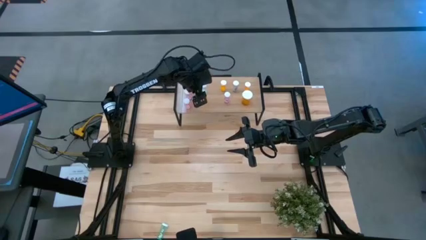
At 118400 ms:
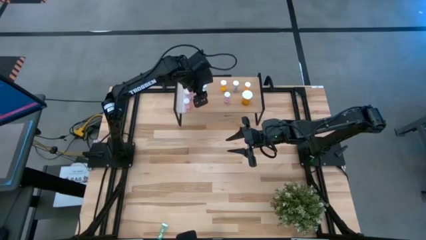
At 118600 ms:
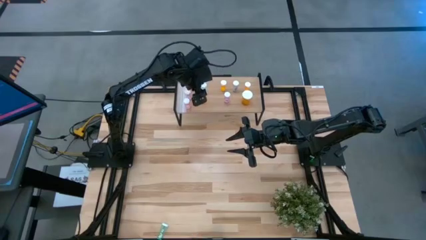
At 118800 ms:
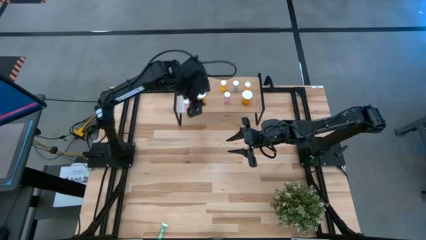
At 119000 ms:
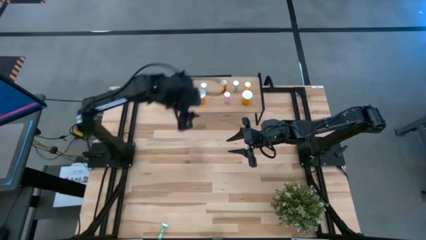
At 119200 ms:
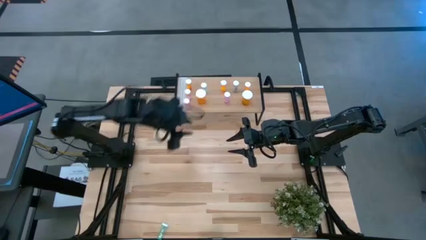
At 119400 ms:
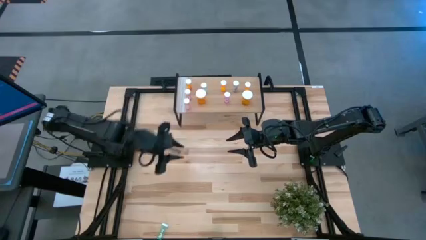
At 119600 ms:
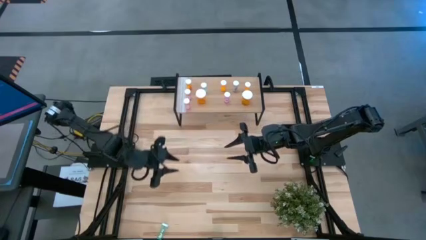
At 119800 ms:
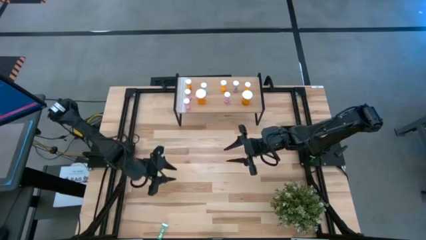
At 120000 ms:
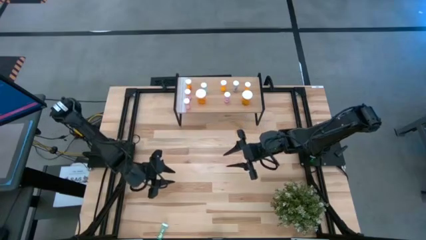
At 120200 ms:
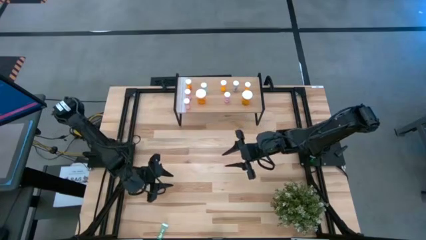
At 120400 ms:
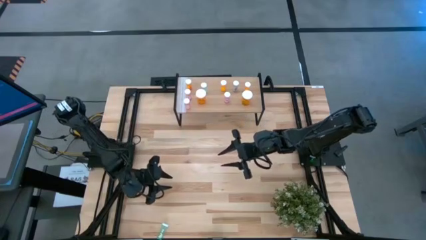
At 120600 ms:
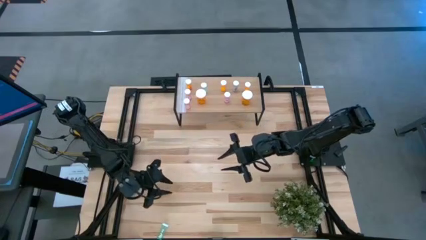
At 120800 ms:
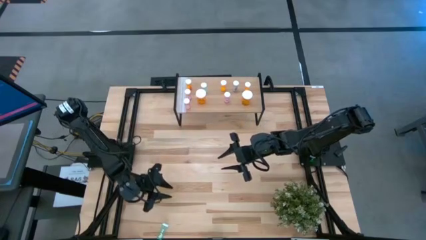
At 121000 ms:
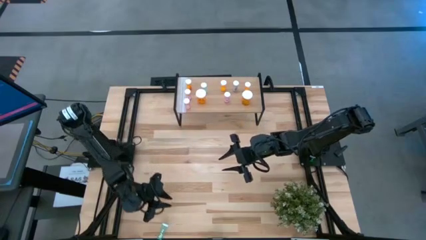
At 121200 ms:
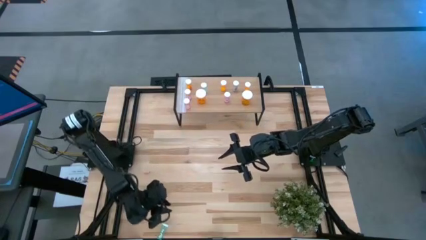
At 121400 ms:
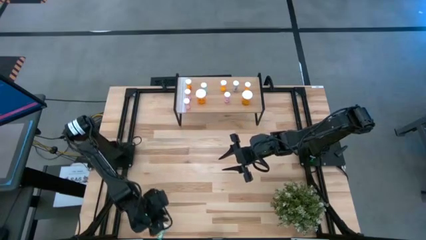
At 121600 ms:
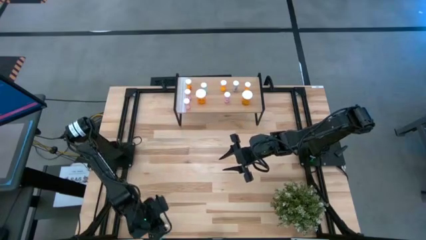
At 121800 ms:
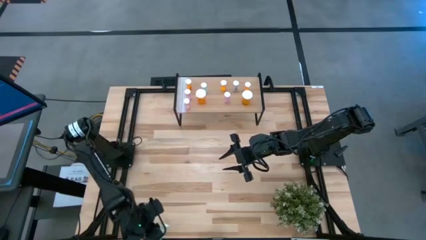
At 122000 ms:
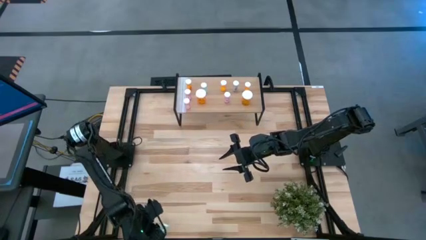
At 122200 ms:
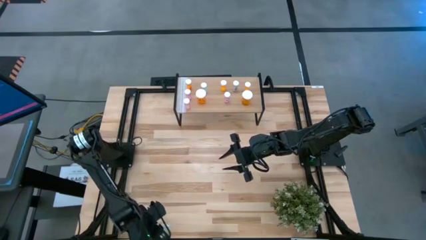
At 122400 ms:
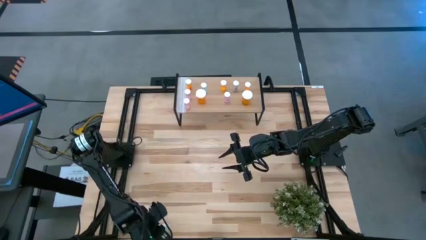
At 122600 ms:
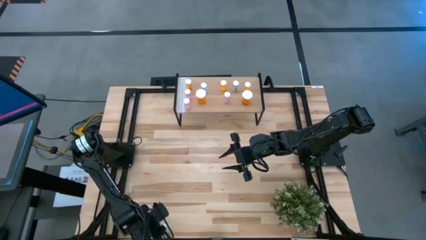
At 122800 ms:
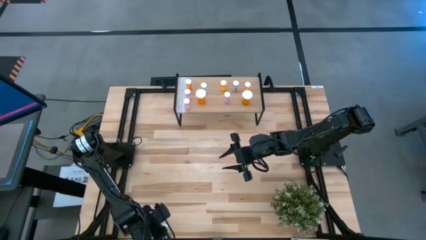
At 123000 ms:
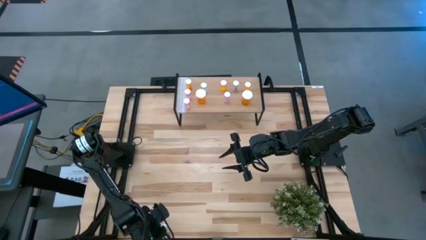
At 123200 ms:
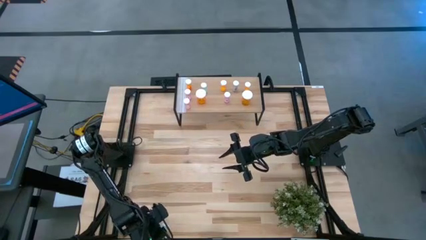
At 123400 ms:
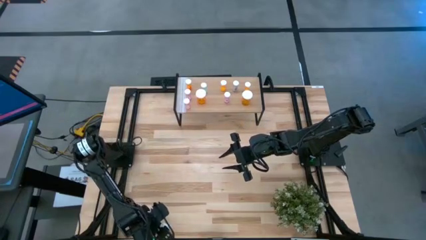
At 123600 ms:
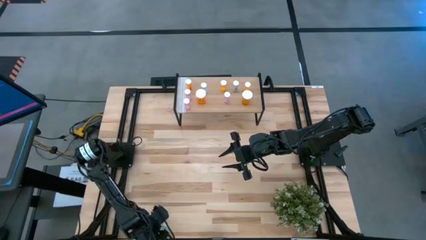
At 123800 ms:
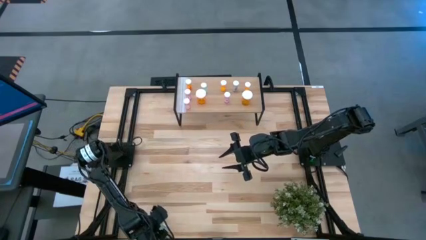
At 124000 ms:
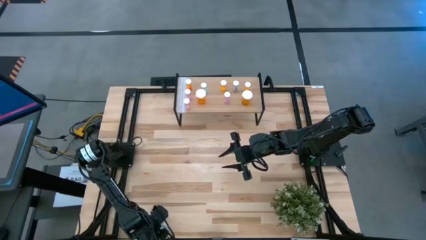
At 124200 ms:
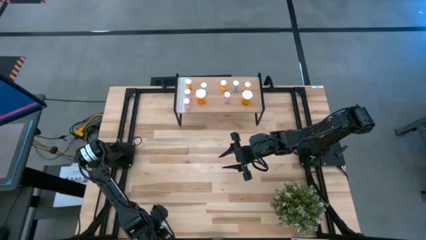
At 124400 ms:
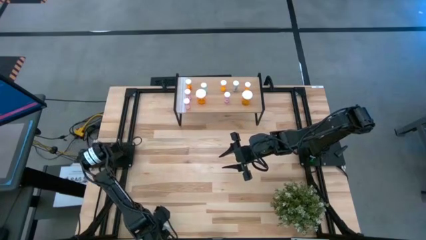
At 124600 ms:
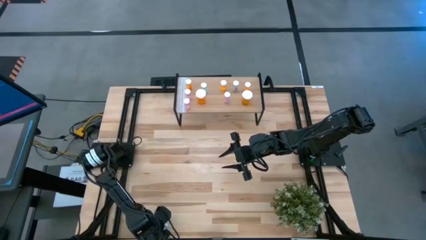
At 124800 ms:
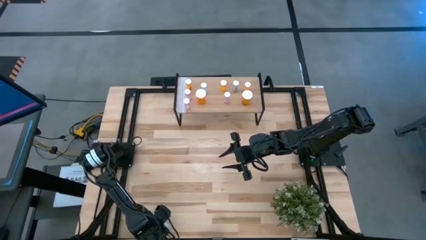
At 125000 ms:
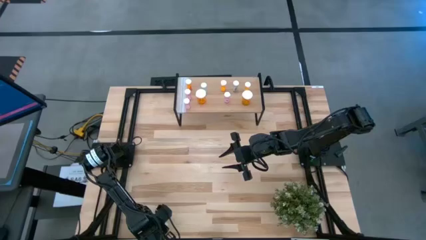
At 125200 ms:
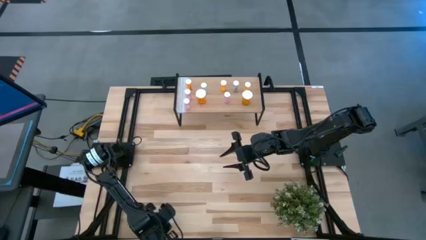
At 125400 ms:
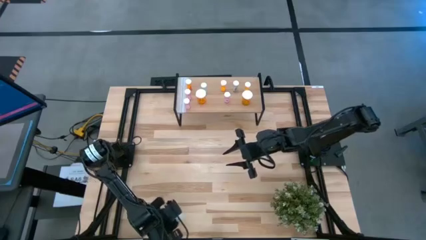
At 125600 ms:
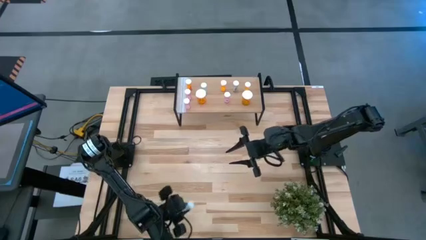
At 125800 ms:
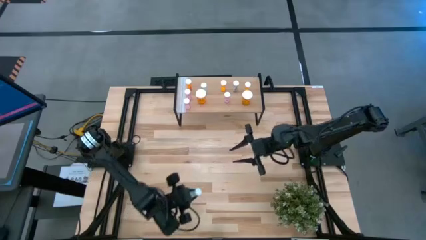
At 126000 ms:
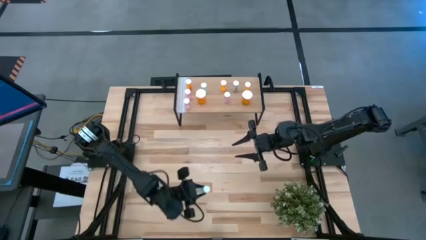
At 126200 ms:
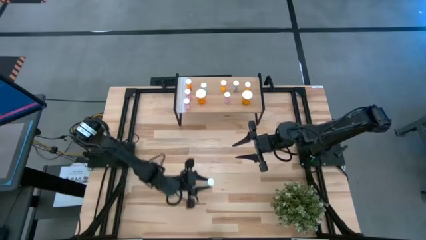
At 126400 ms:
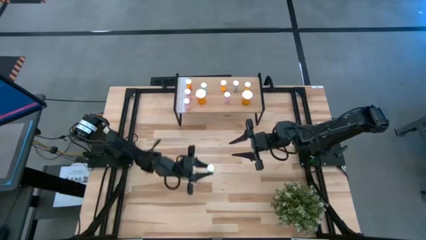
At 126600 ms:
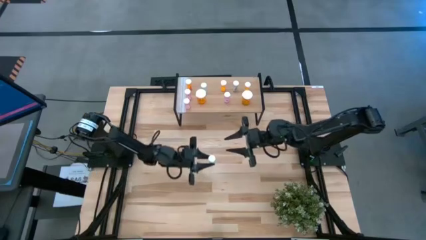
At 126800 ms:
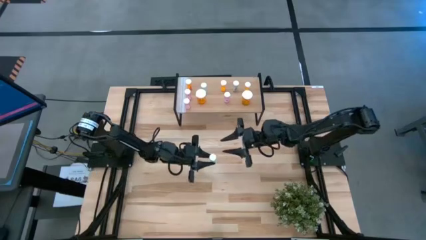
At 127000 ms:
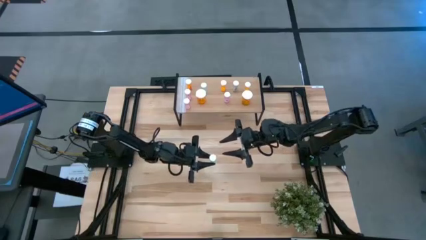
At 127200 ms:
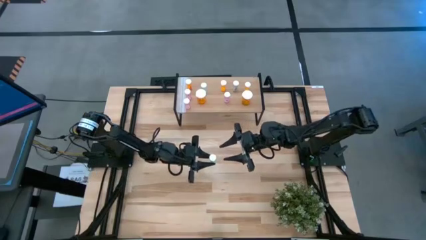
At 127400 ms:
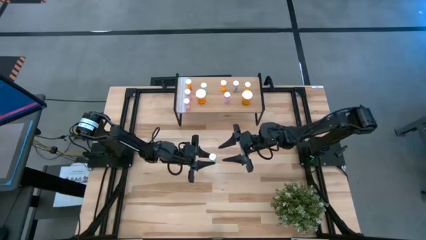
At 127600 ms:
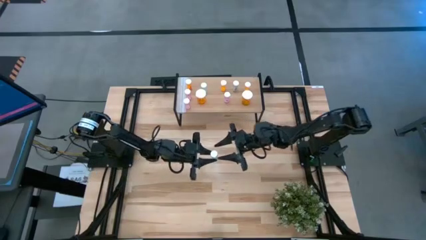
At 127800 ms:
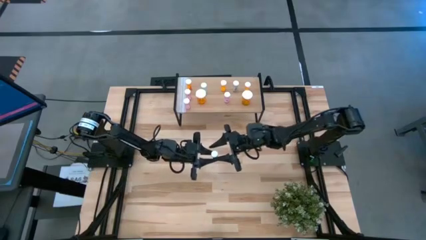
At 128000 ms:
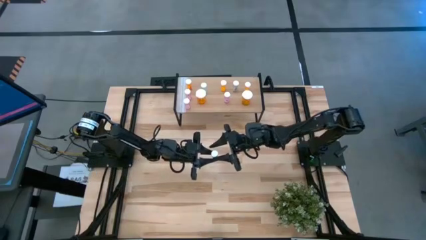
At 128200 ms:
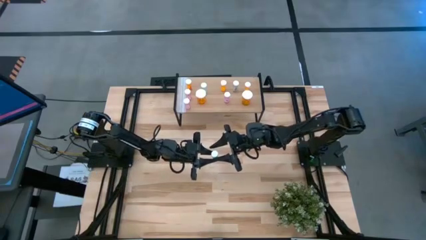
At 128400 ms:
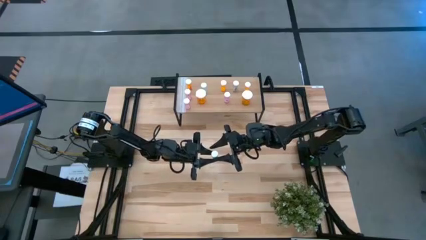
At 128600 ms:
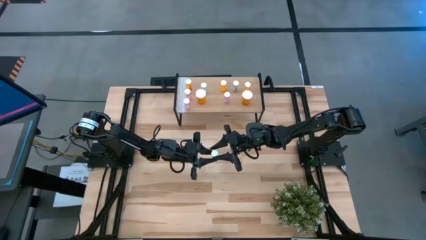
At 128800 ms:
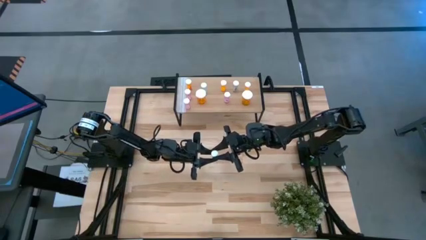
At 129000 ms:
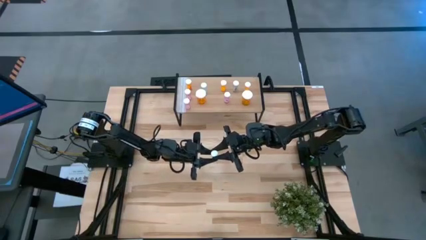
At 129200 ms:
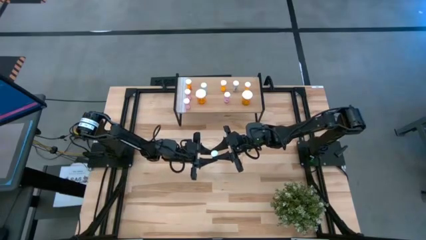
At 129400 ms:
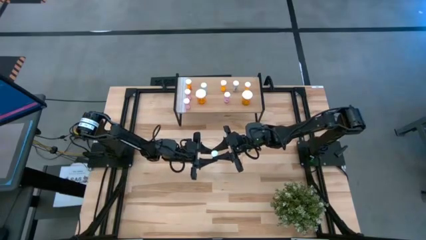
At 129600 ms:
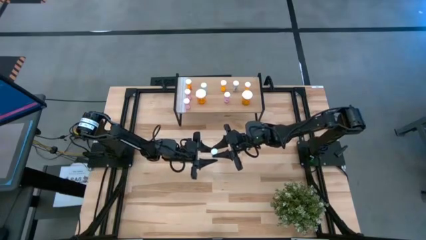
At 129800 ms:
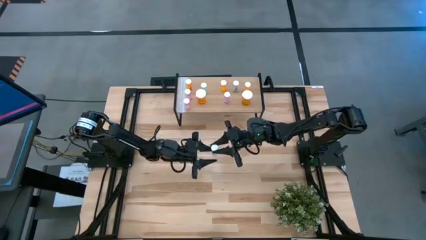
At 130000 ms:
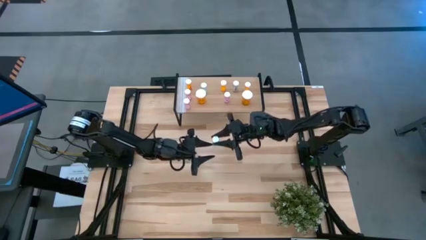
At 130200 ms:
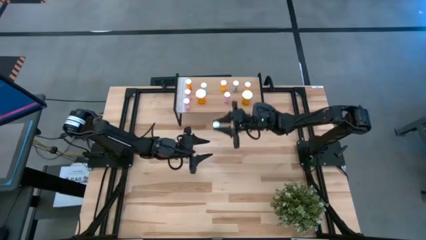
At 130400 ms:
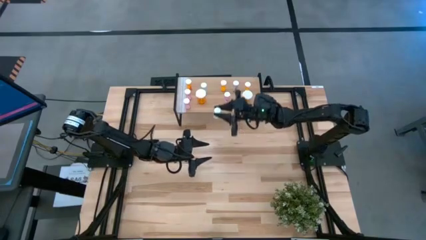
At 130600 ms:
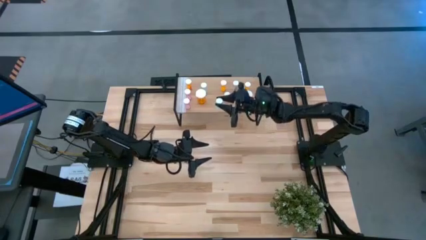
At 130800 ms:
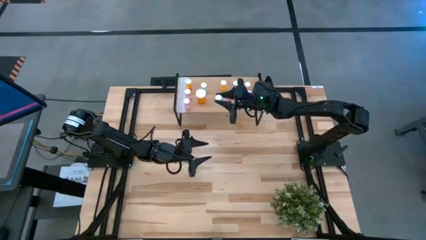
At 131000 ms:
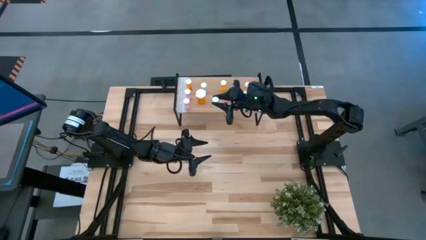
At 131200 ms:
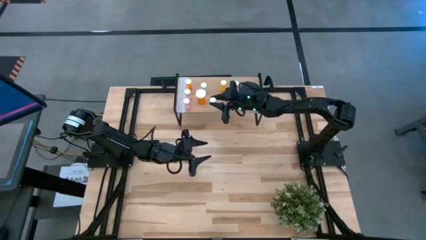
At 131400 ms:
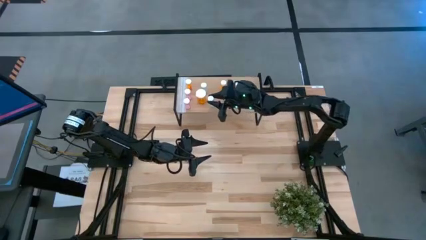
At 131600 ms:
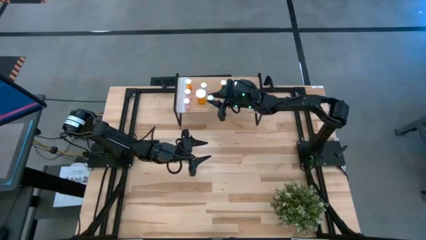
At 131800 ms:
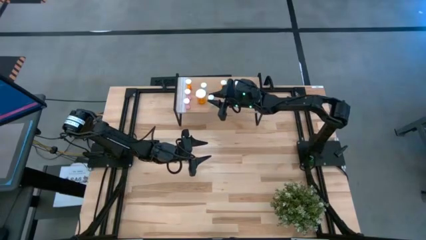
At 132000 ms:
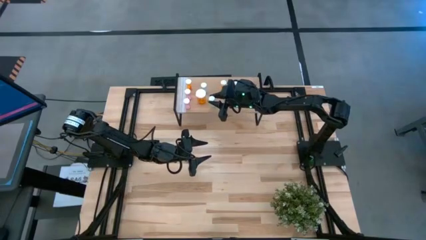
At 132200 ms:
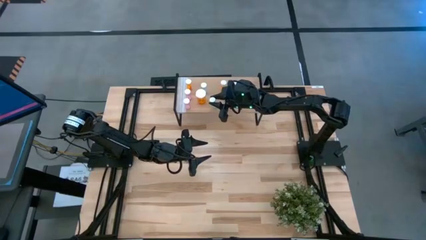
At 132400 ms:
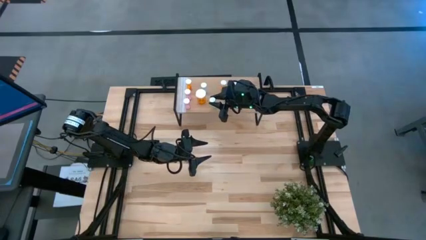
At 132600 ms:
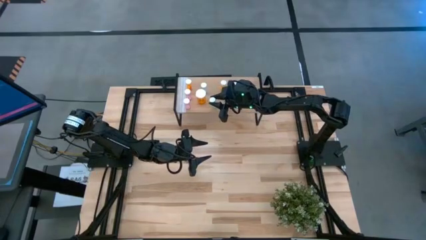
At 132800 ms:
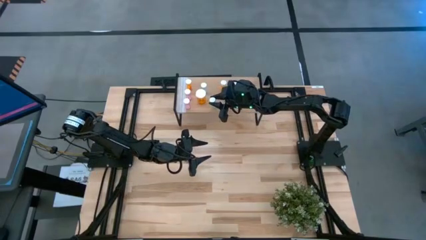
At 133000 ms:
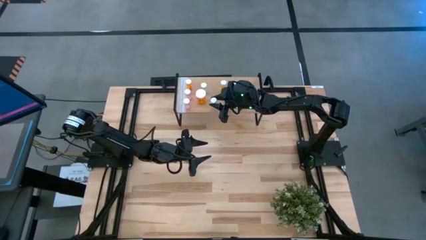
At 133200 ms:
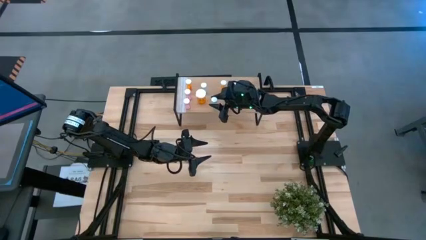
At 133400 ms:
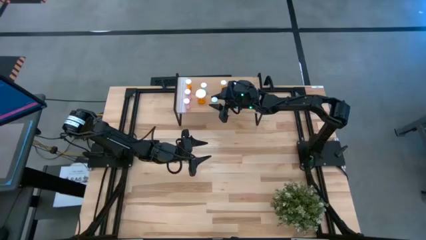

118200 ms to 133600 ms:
Task: Pick and place medicine bottles onto shelf by color
Put the blue pill bottle on the shelf
